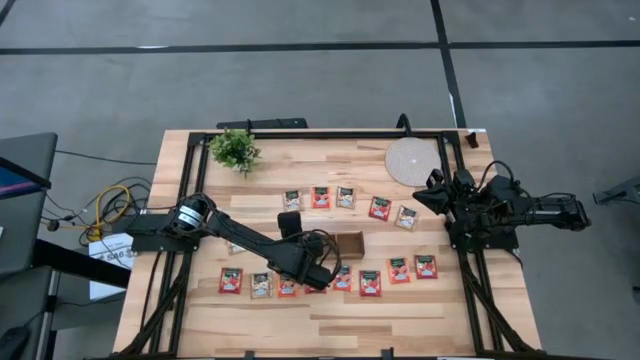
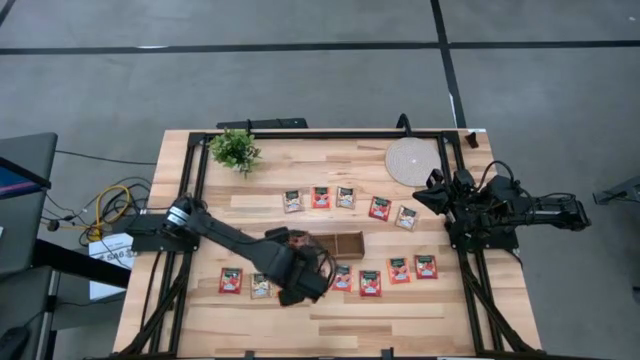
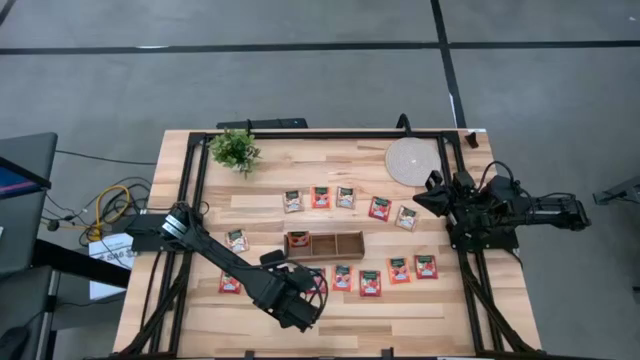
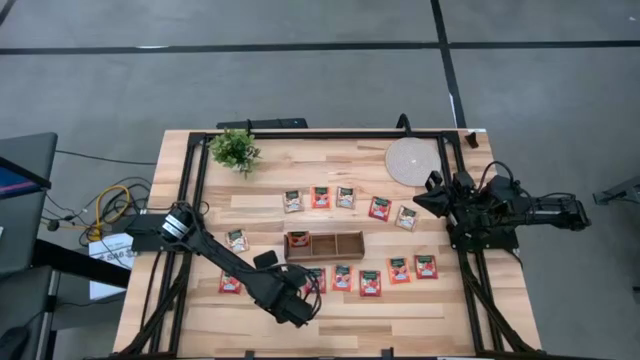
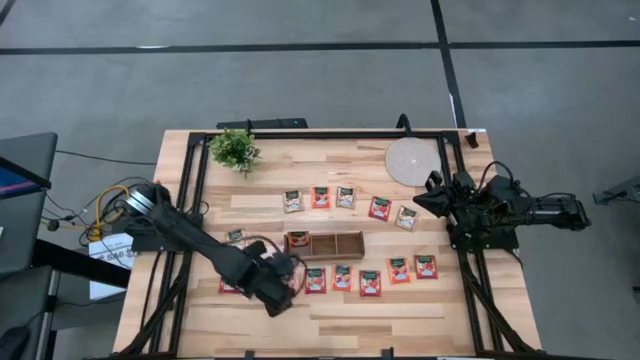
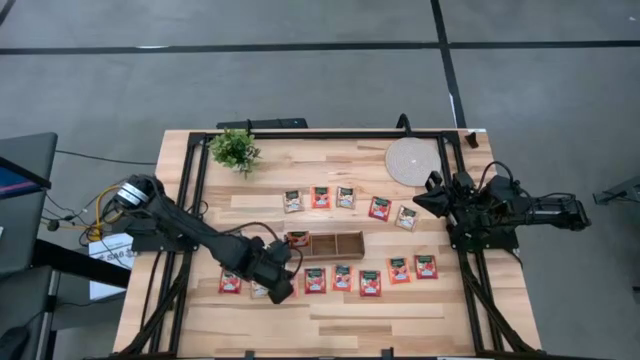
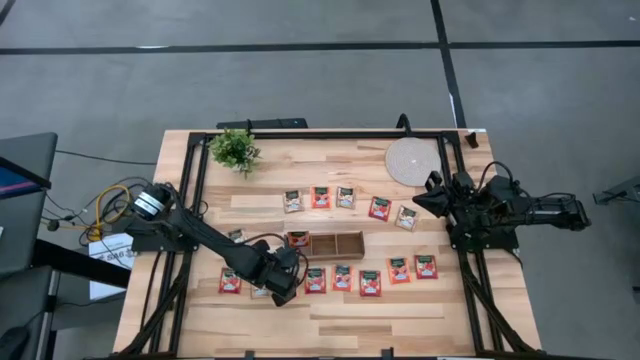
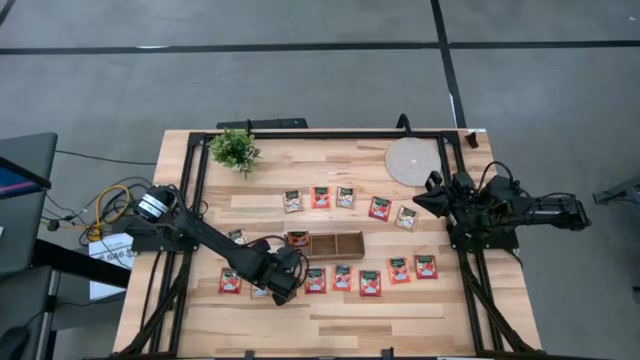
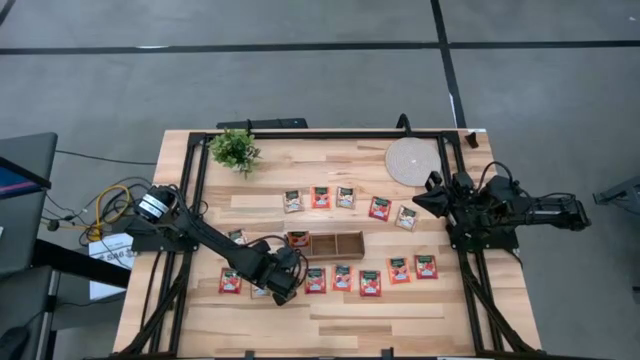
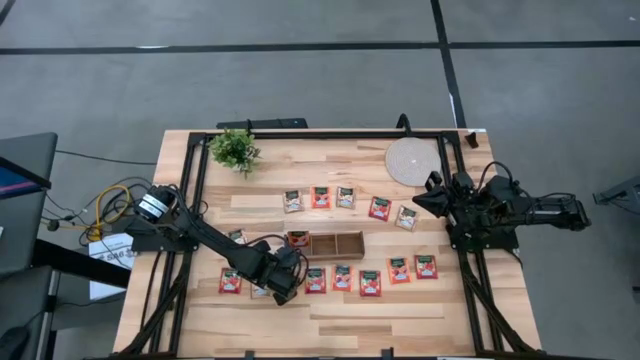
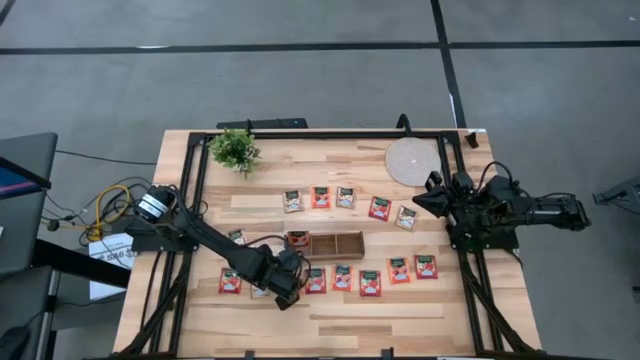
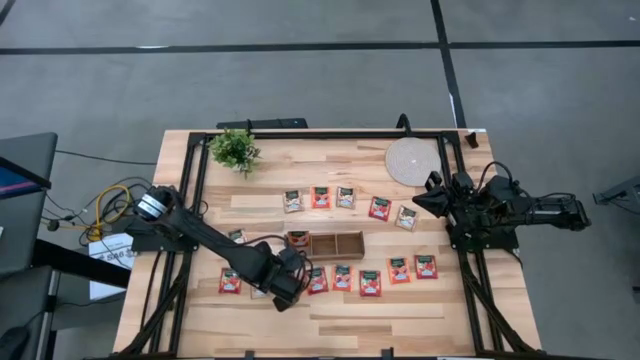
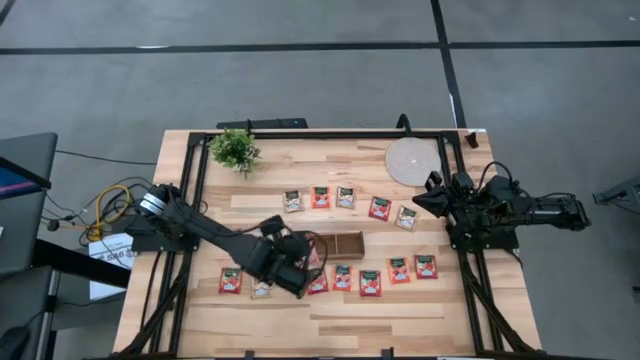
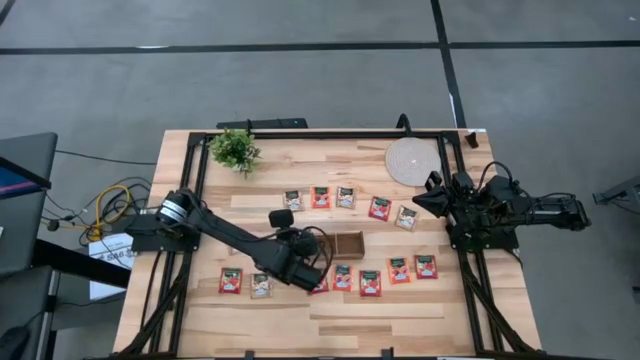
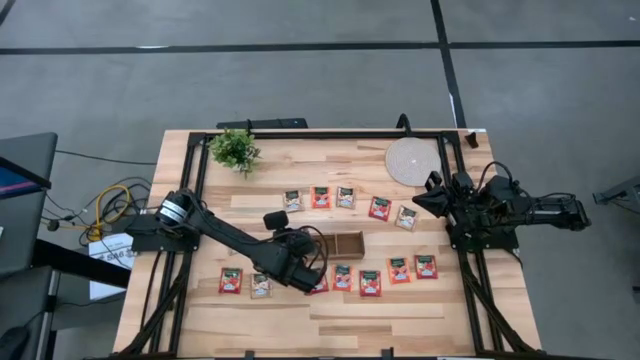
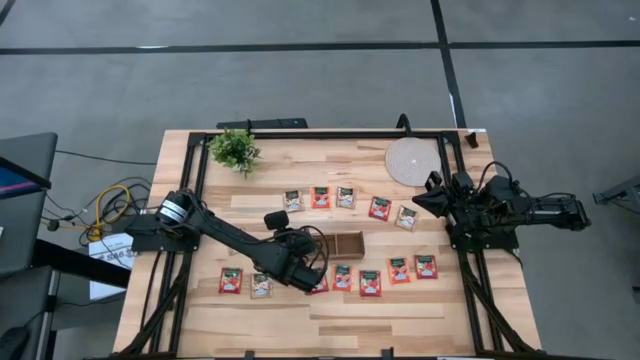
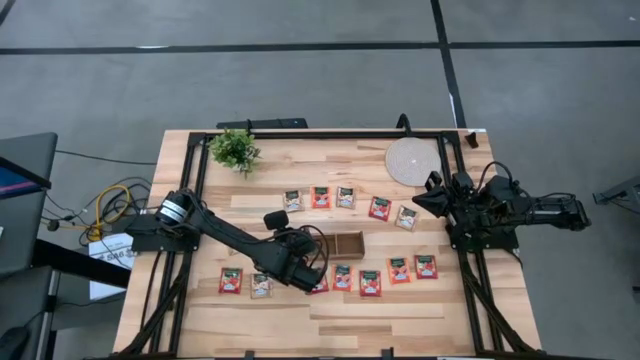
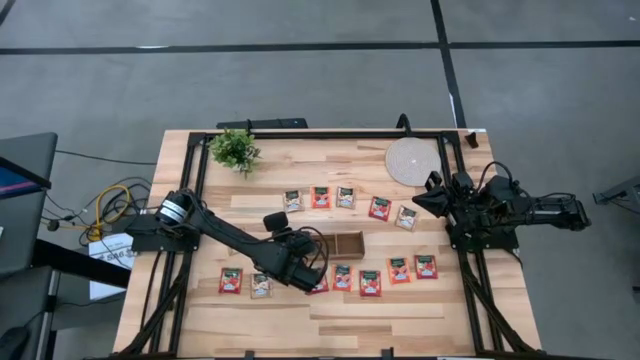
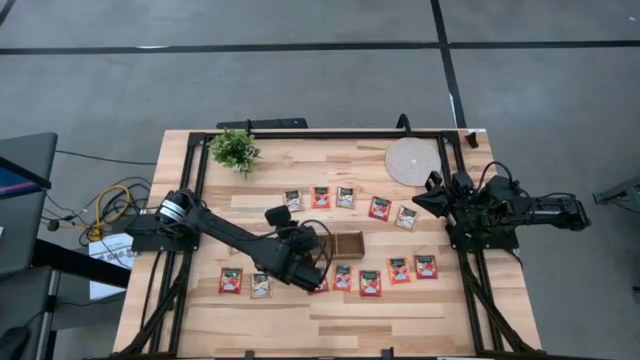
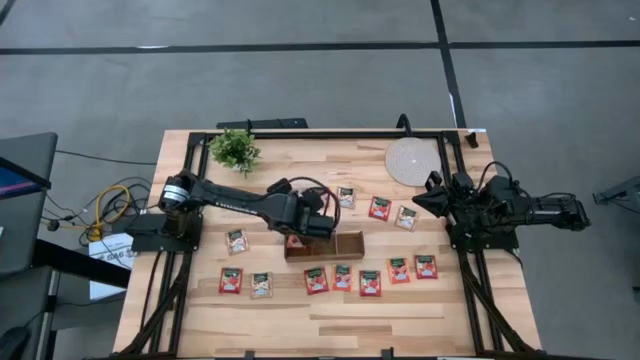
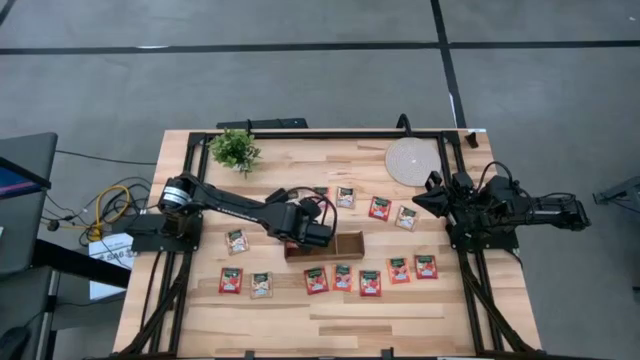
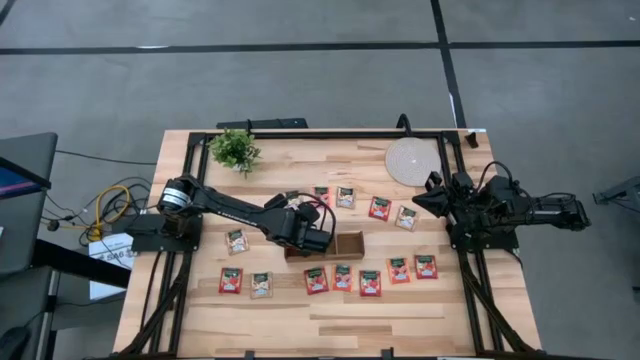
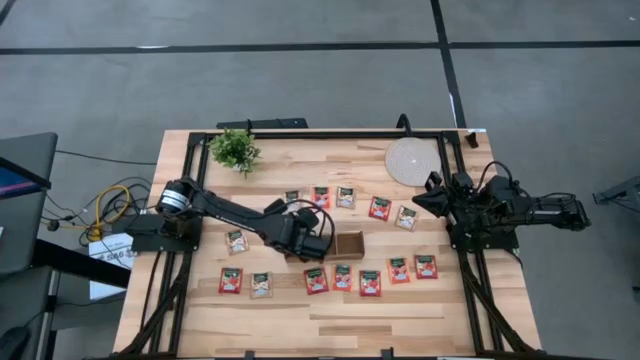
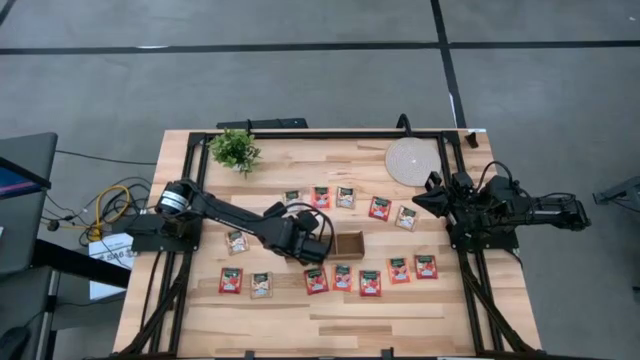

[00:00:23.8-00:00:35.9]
Task: Pick & Place Tea
Put the orange tea bag into the left section of the wooden organizer

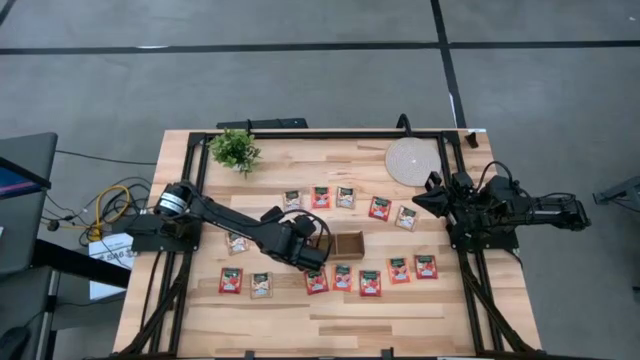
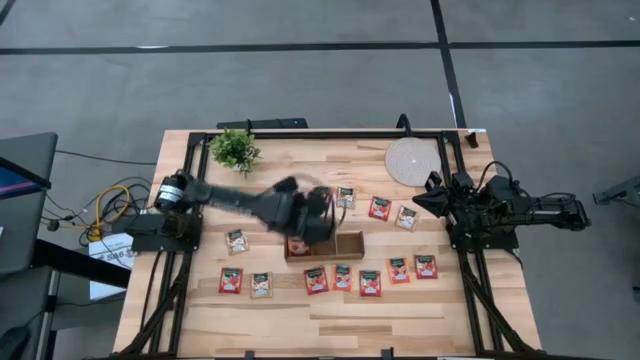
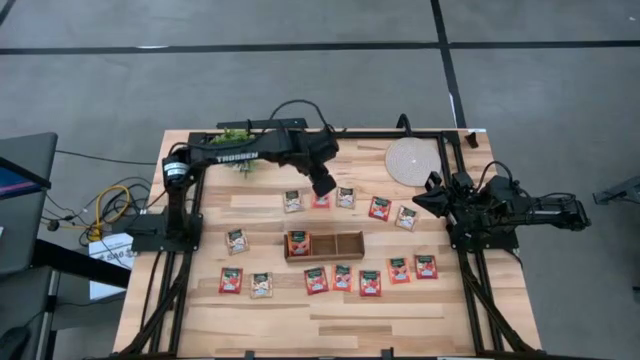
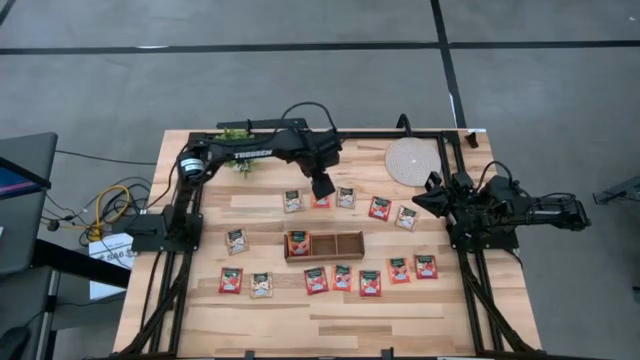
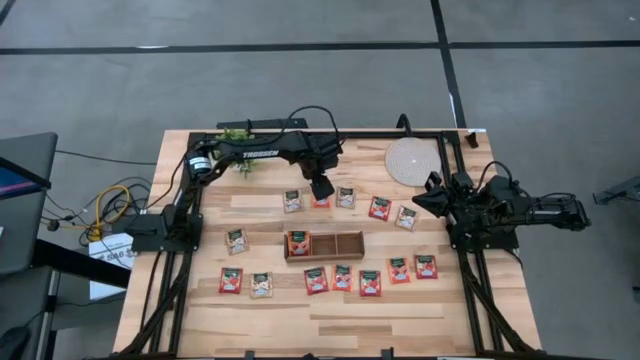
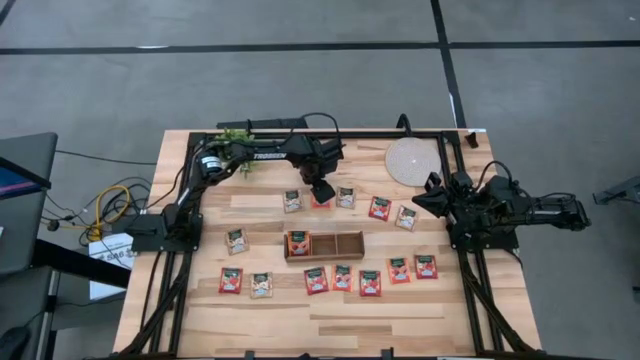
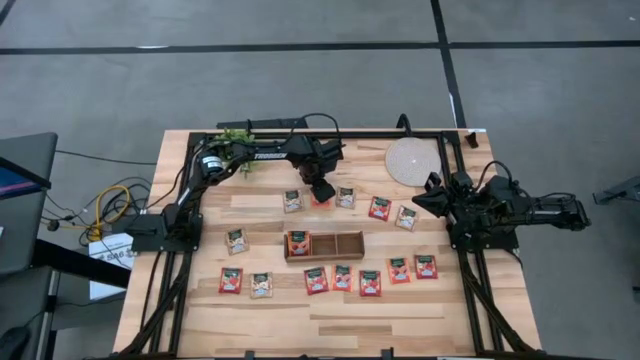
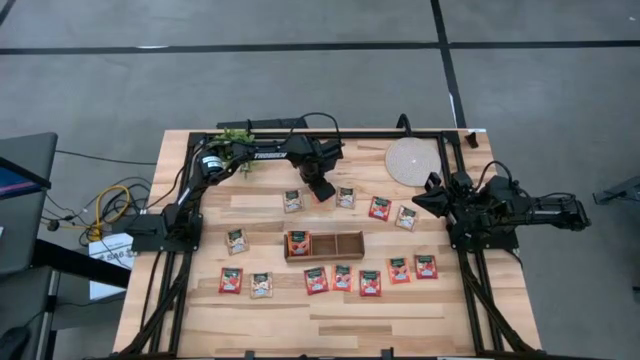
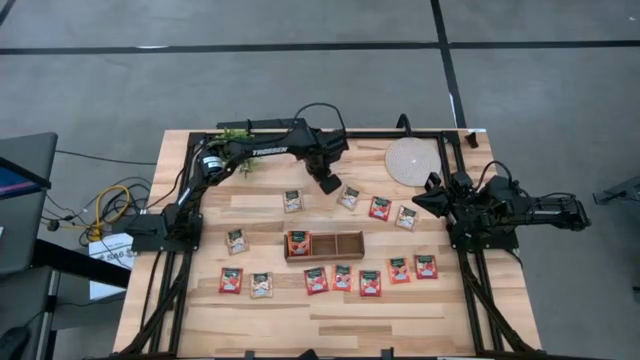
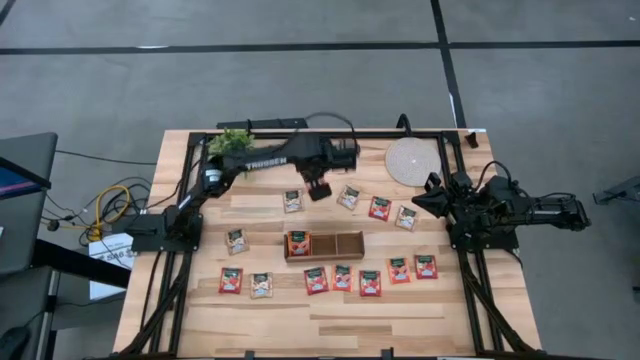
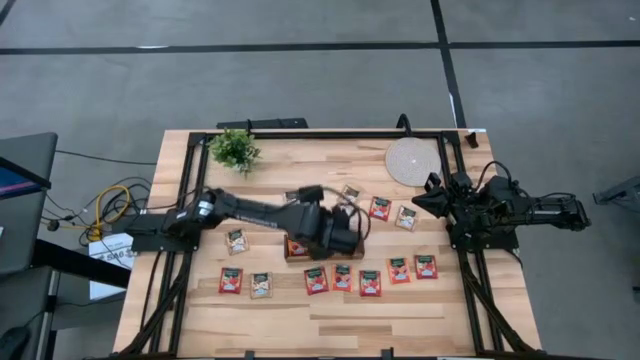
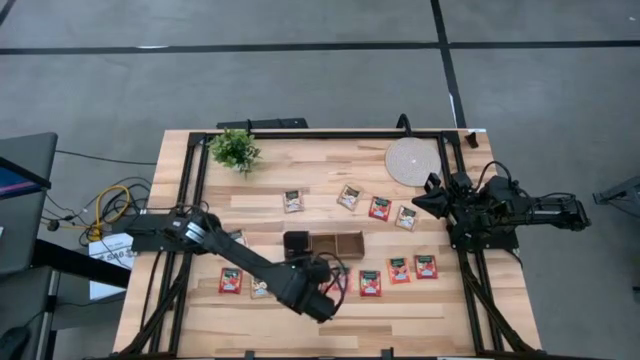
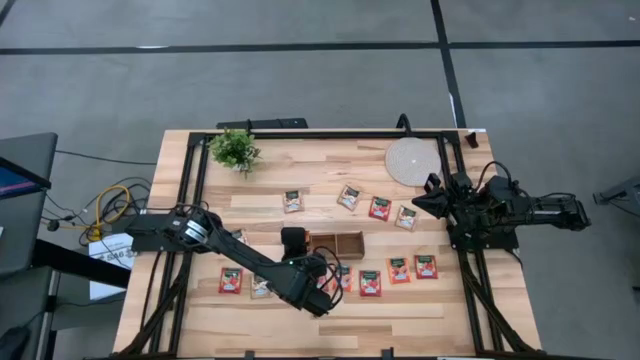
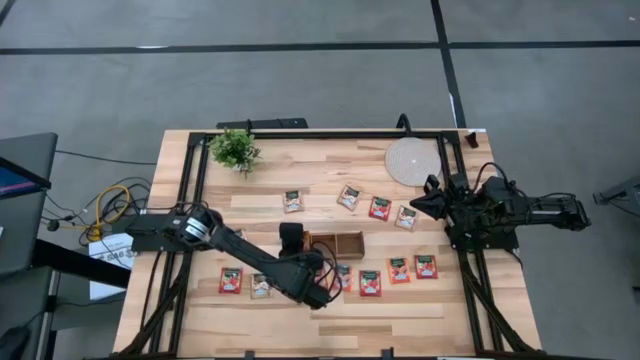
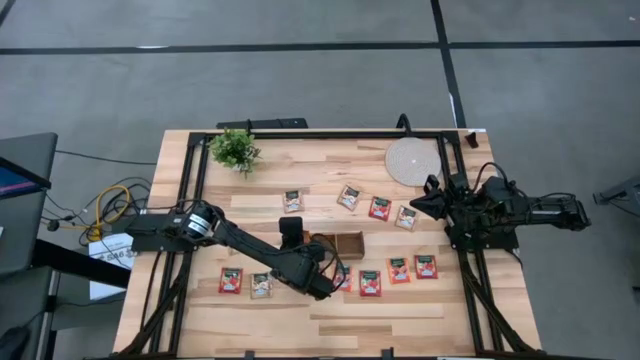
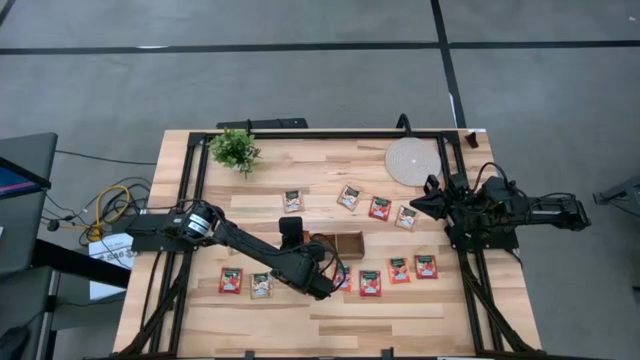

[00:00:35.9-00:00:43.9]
Put the orange tea bag into the left section of the wooden organizer
